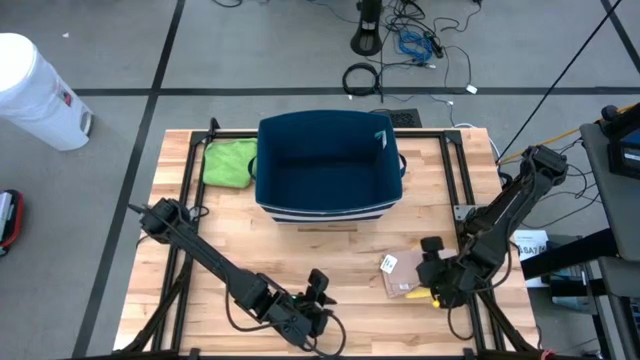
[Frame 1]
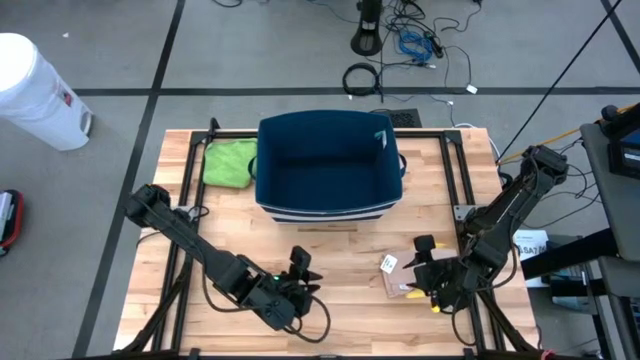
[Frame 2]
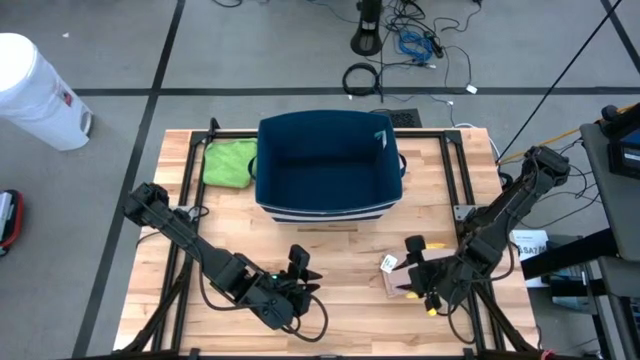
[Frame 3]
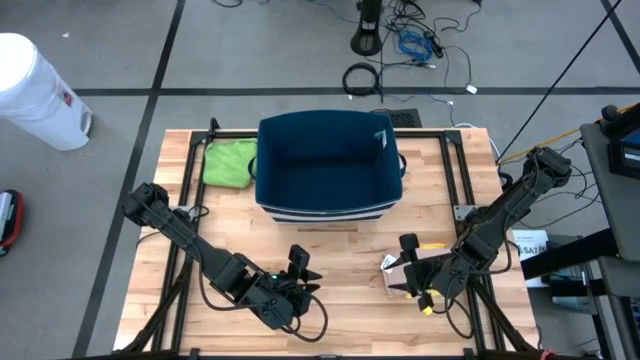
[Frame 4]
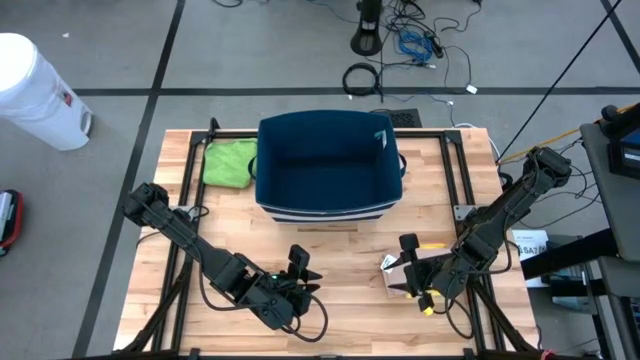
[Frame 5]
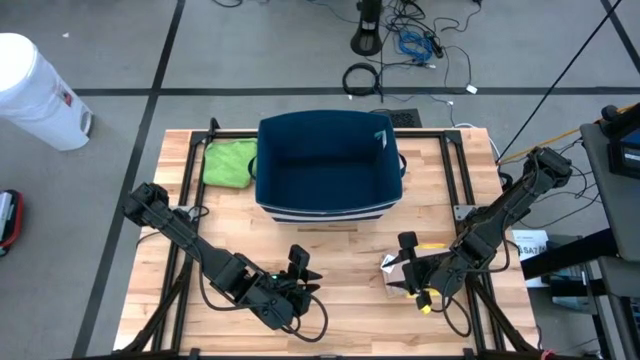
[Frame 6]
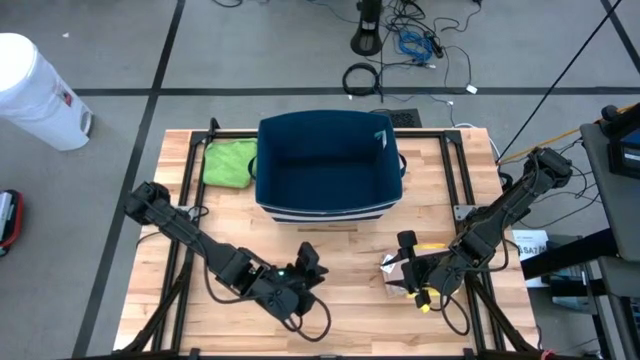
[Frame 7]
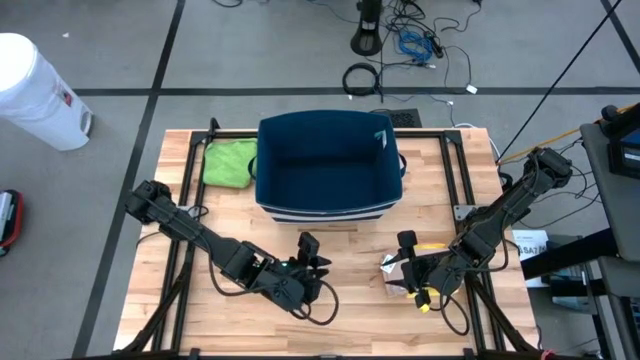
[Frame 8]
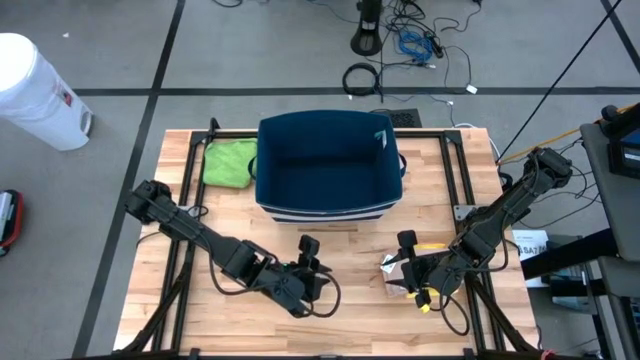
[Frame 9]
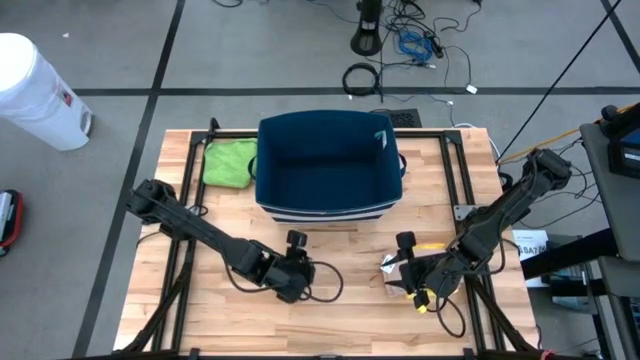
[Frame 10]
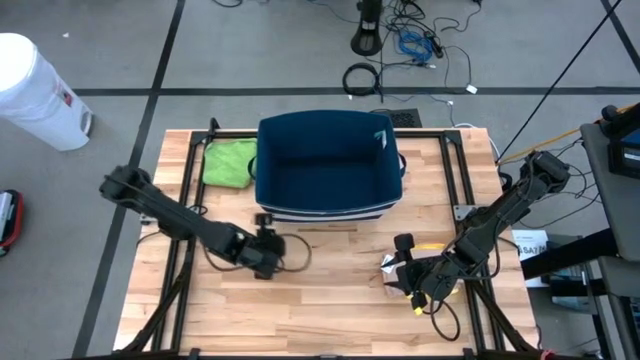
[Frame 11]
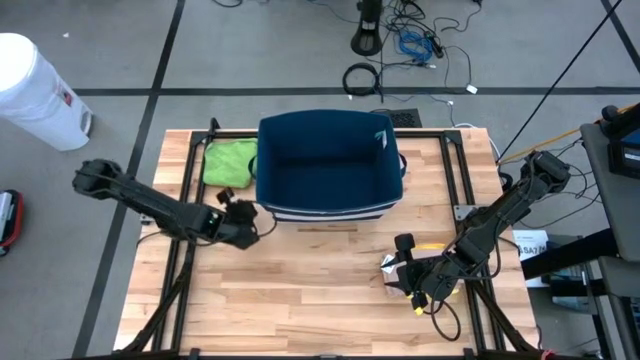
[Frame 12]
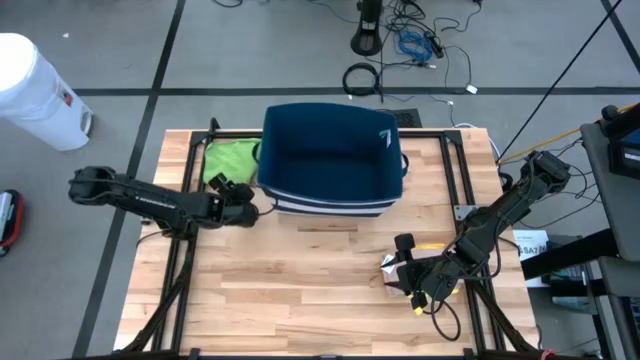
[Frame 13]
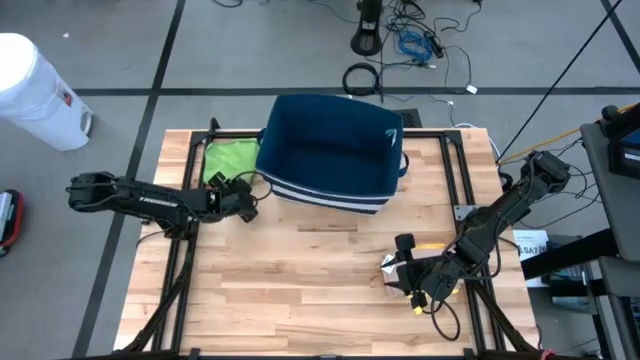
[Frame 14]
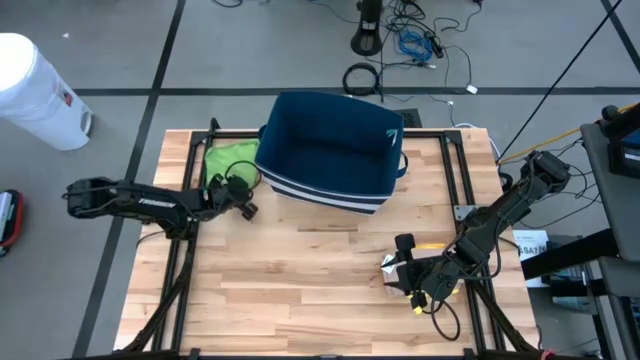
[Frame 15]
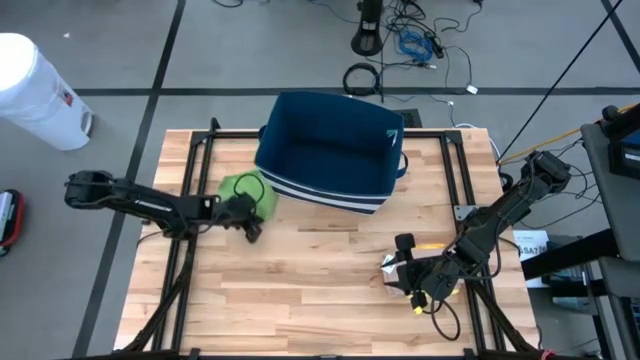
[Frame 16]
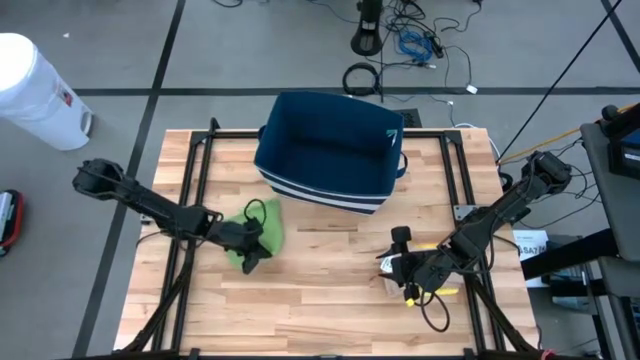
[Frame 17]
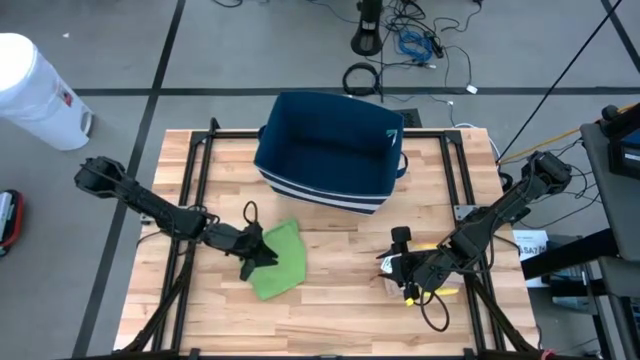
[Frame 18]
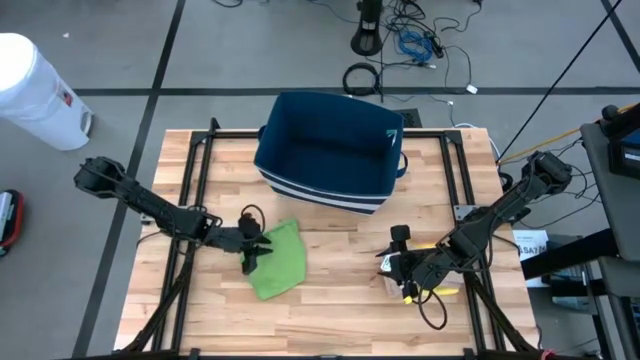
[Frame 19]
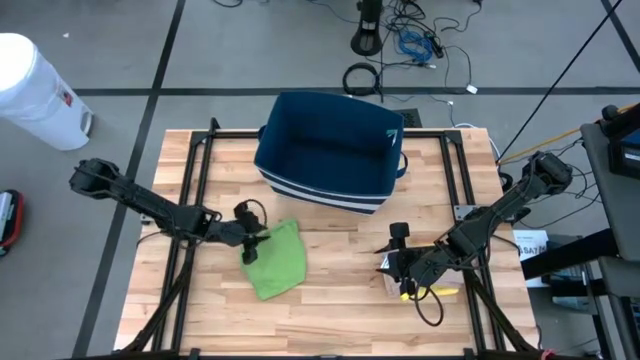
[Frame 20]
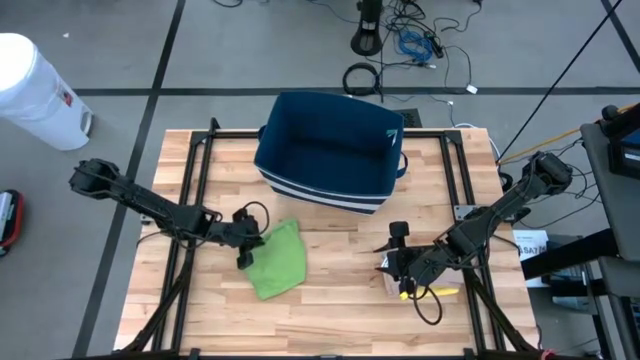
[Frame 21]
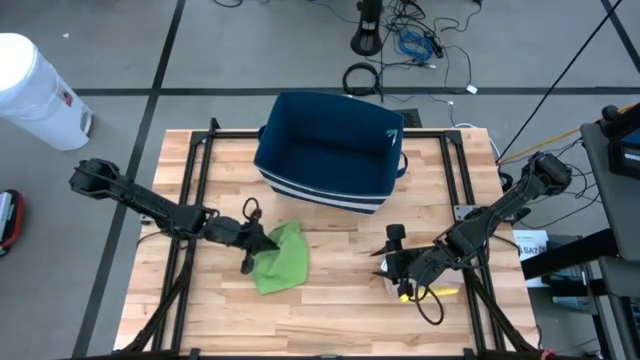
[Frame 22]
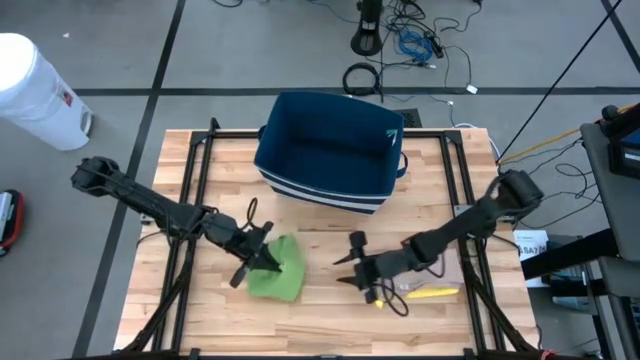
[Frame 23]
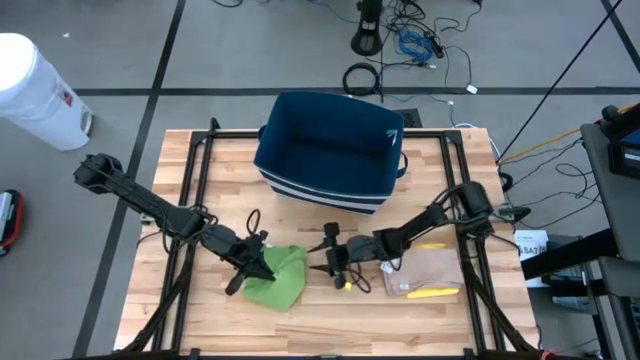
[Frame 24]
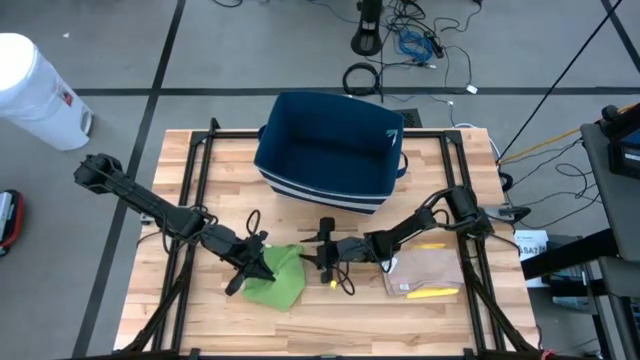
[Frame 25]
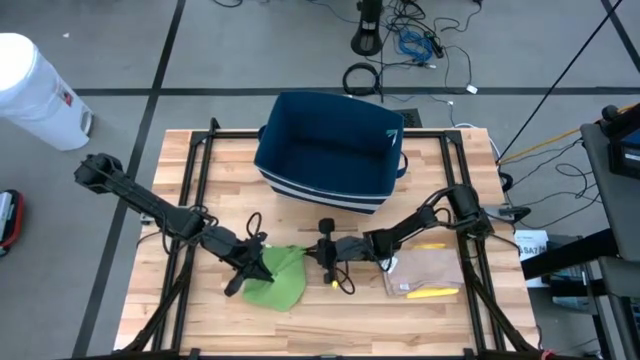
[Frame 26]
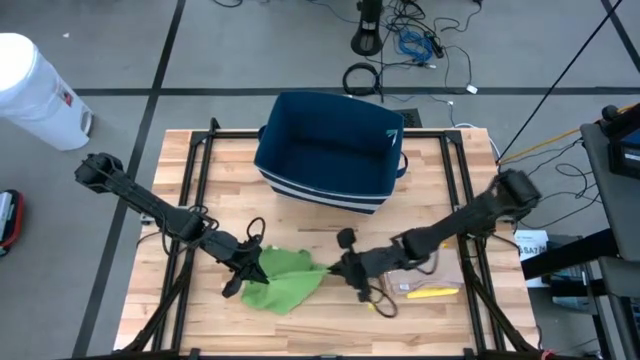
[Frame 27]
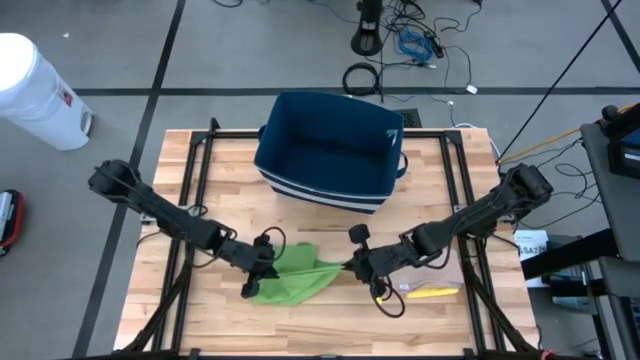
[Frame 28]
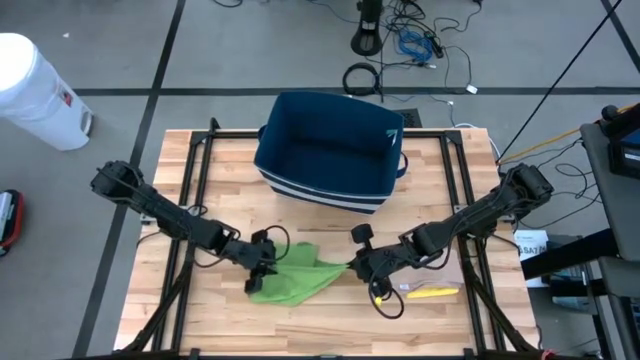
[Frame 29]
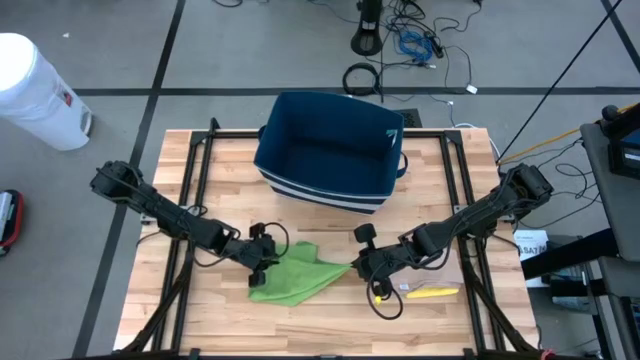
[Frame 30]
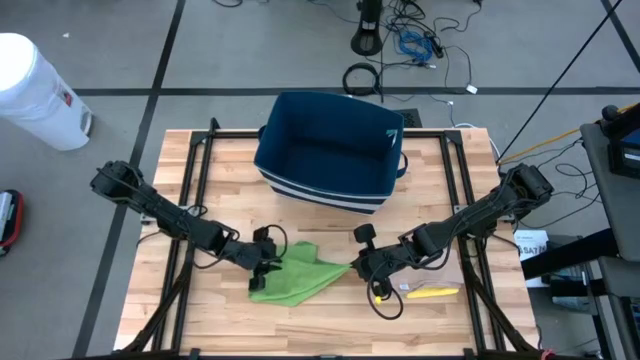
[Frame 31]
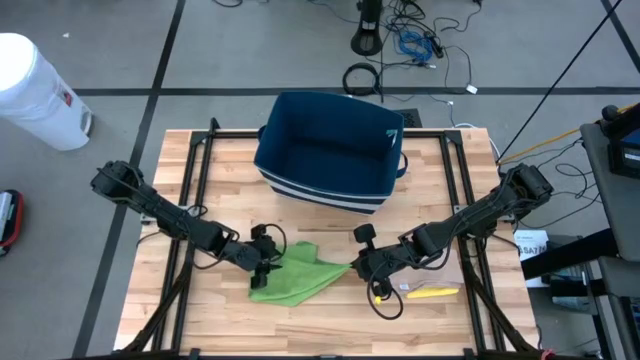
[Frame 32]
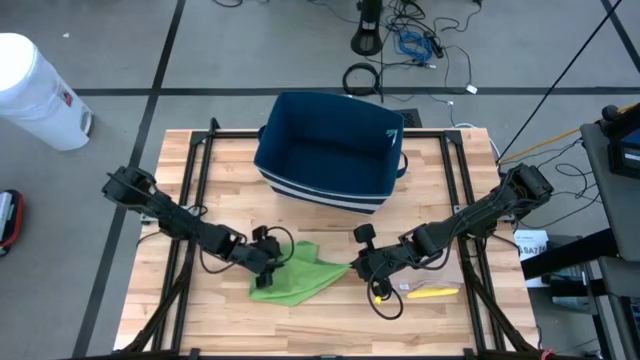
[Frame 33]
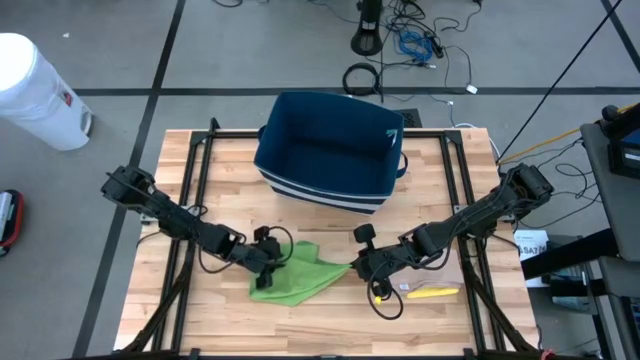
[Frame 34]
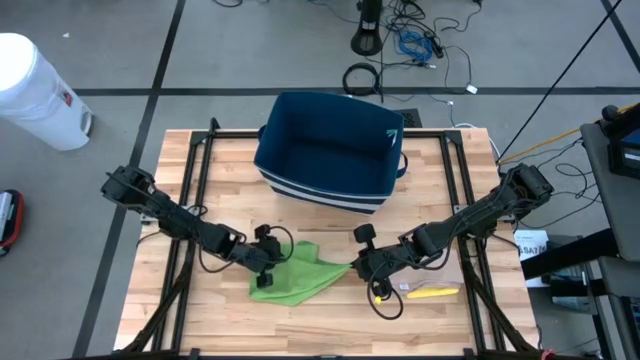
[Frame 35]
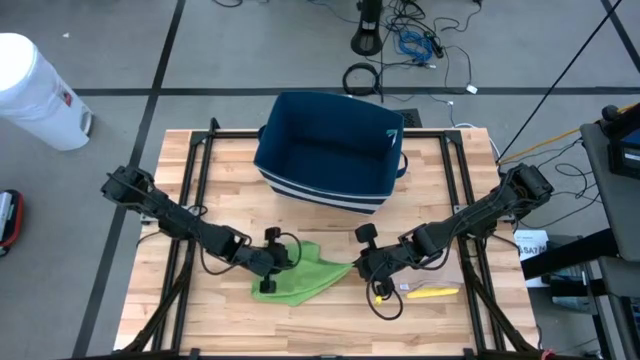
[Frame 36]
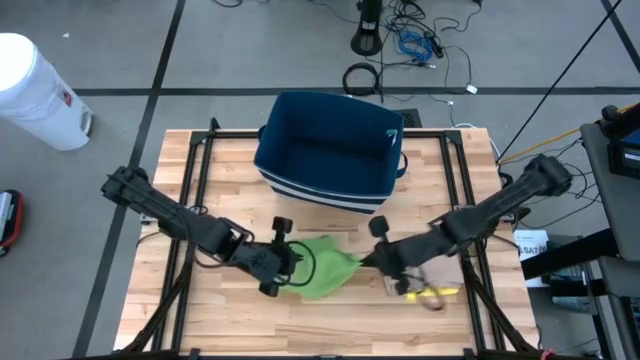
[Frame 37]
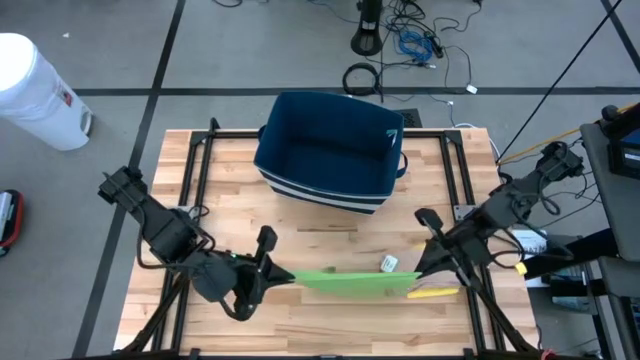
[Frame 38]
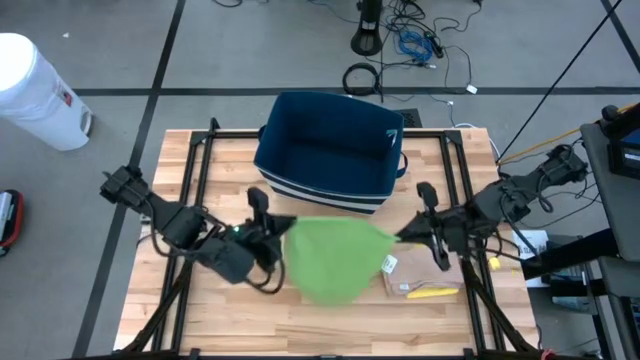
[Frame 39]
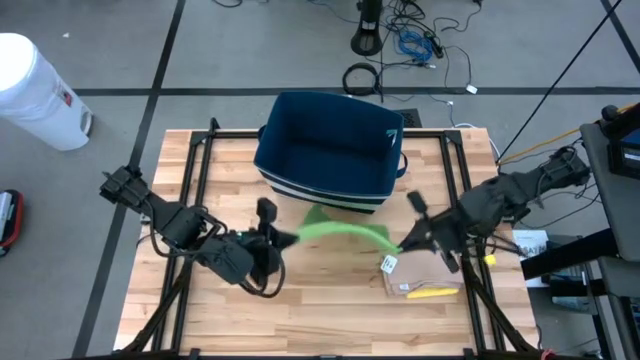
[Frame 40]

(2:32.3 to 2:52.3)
Task: Fold towel
Fold the green towel

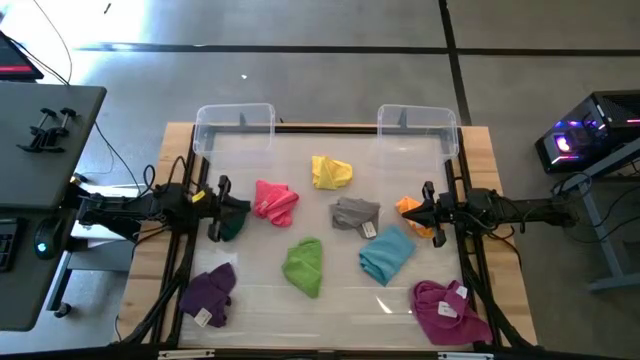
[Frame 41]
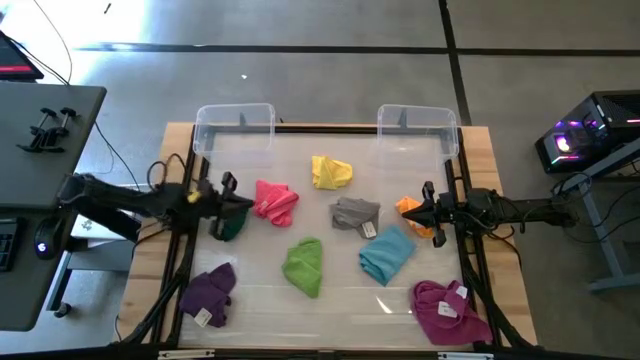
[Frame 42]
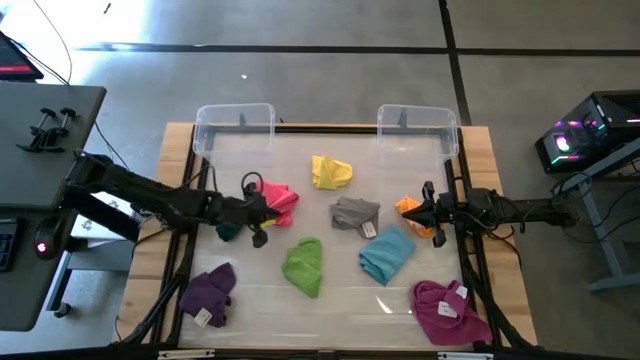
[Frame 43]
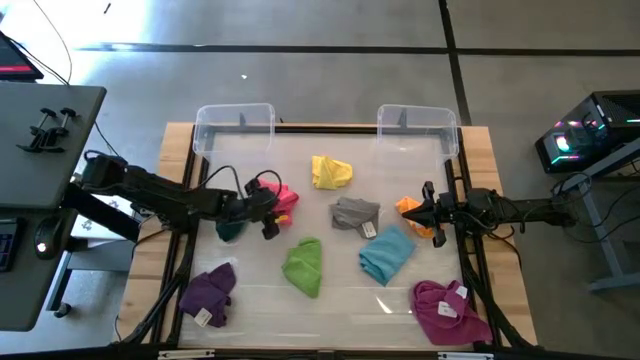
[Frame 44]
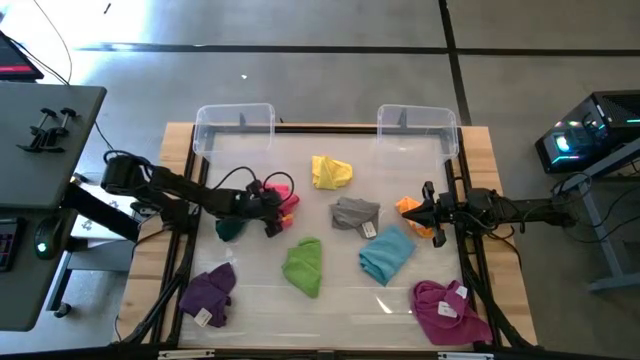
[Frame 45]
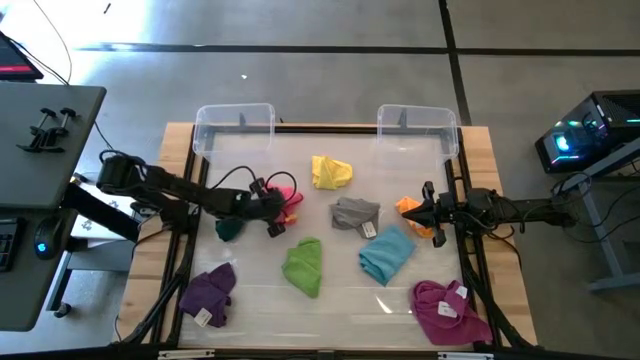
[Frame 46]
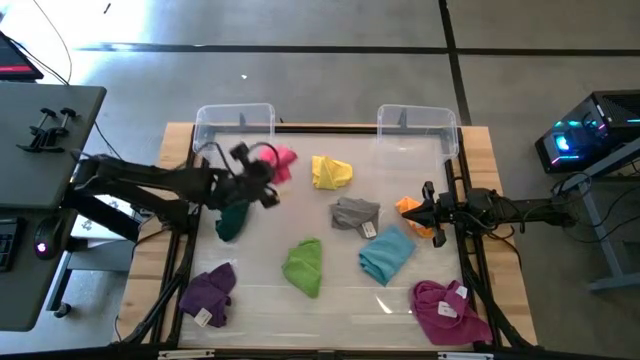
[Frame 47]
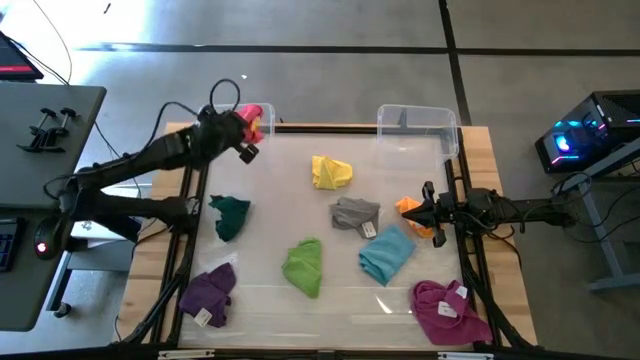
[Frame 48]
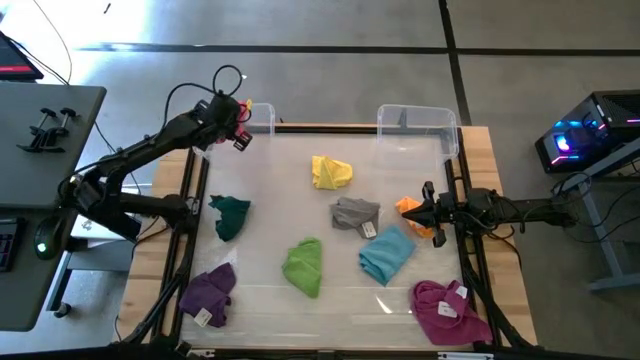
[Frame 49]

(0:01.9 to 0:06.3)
Task: Sort towels by color in basket
Put the pink microfiber cloth into the left transparent bin
